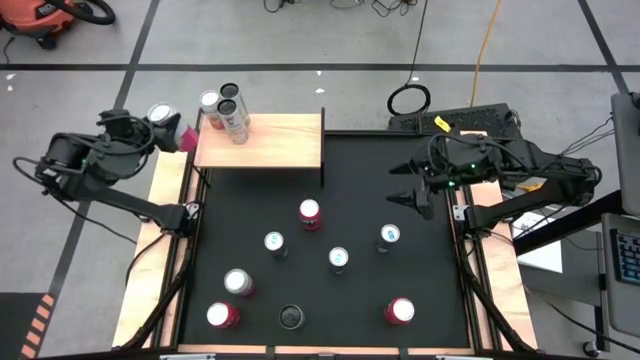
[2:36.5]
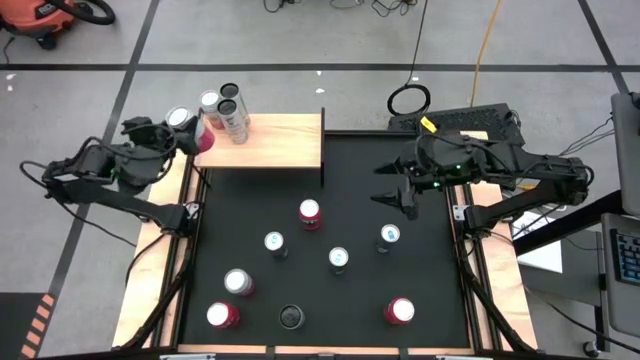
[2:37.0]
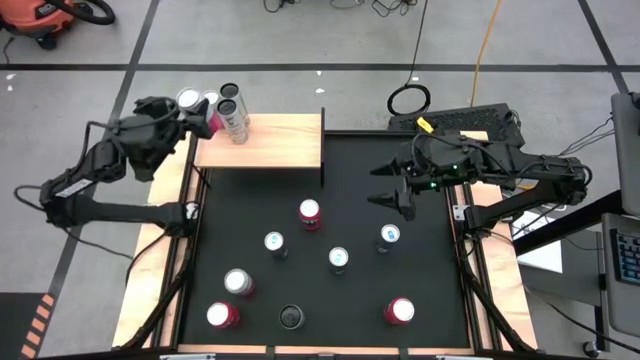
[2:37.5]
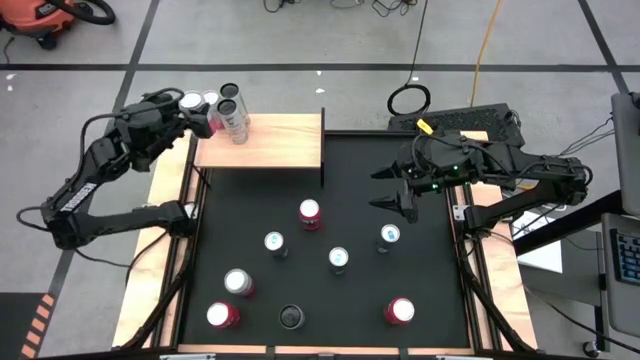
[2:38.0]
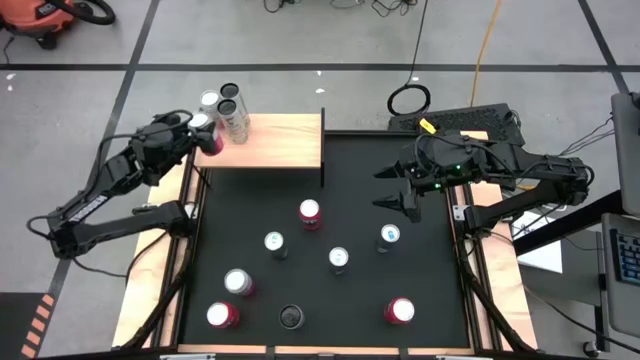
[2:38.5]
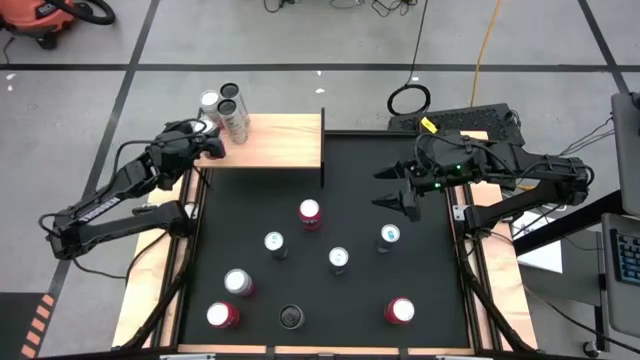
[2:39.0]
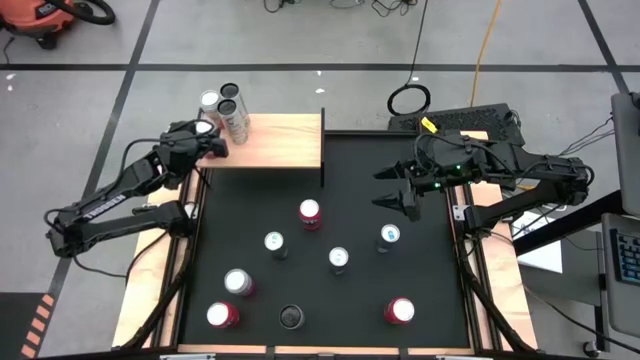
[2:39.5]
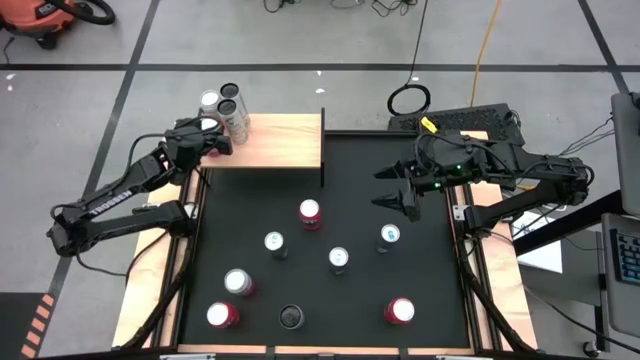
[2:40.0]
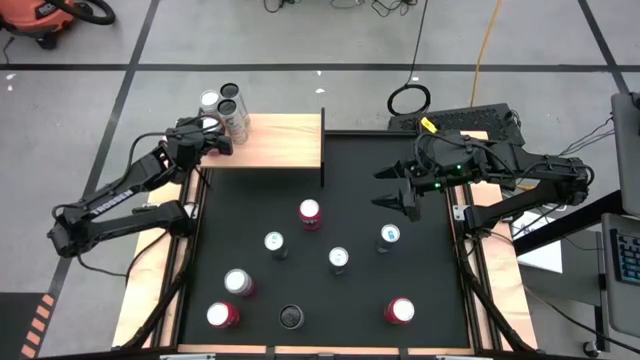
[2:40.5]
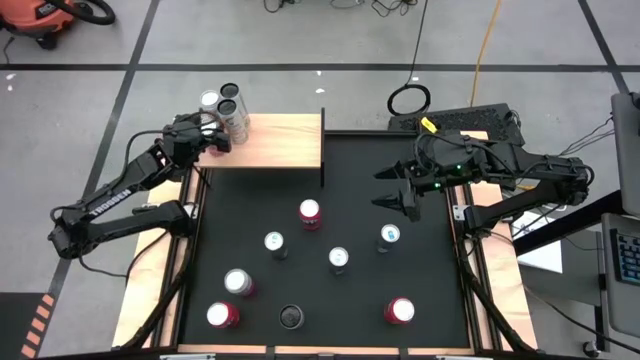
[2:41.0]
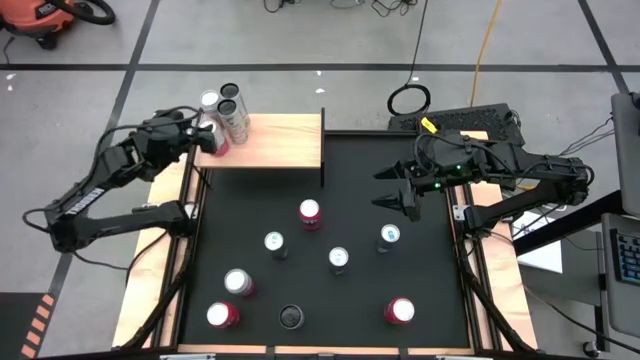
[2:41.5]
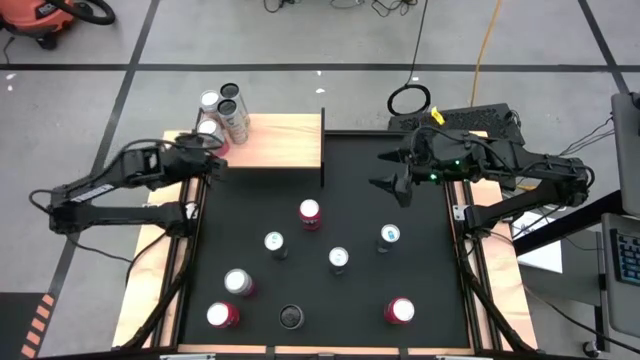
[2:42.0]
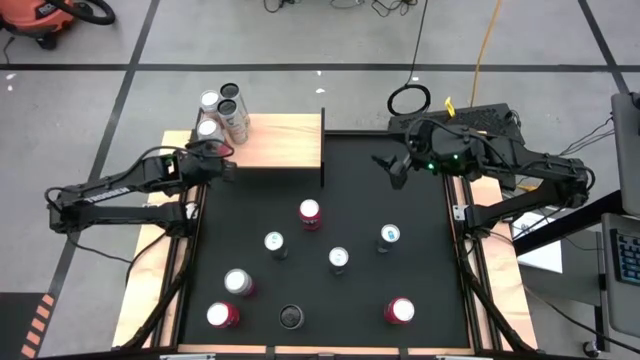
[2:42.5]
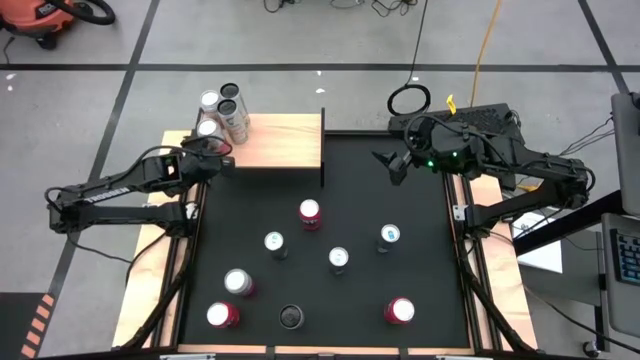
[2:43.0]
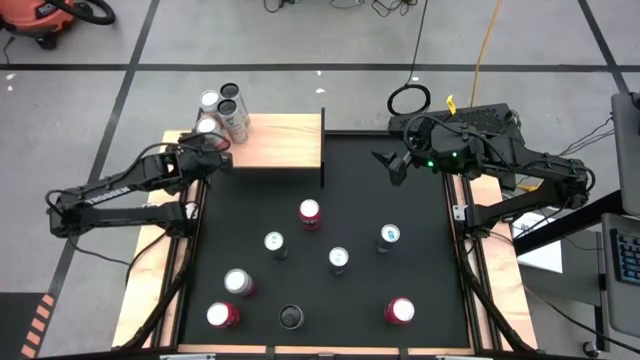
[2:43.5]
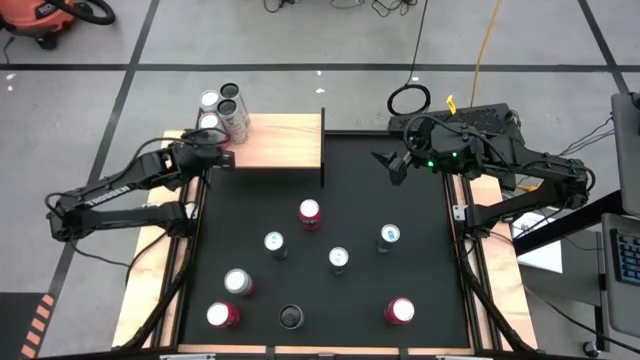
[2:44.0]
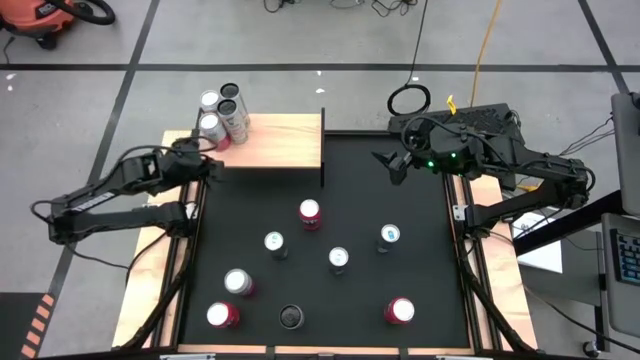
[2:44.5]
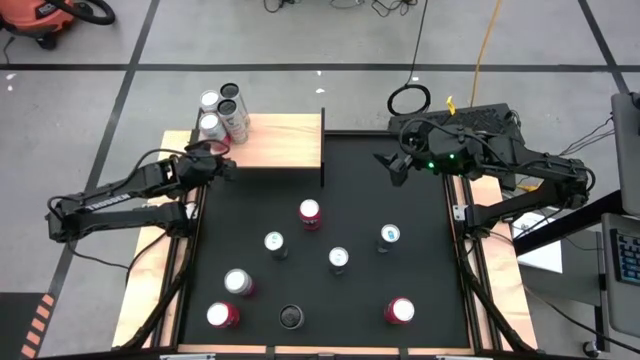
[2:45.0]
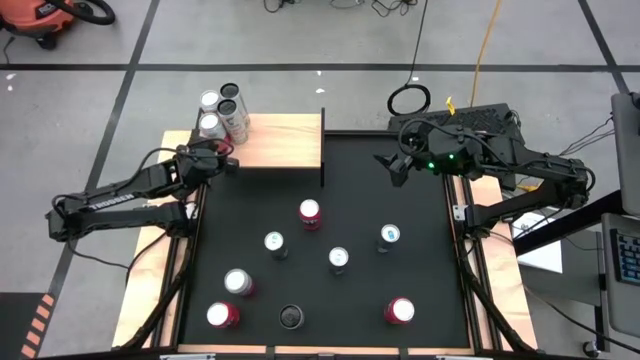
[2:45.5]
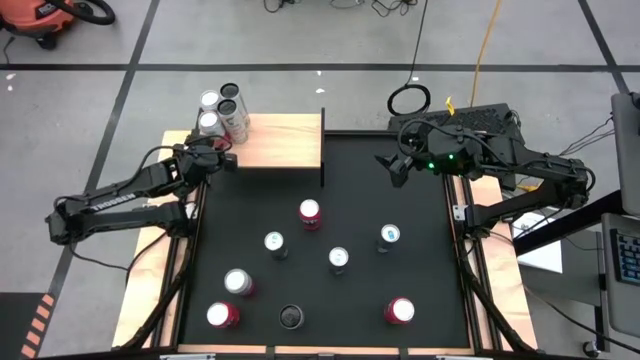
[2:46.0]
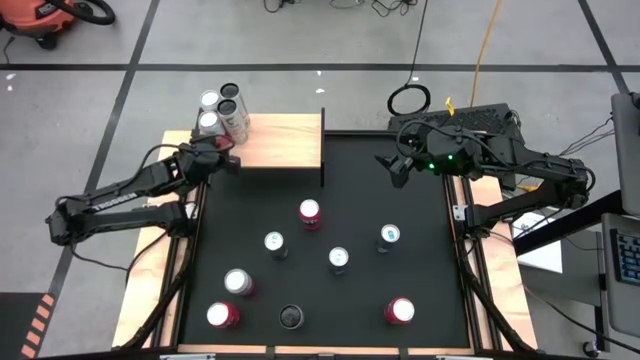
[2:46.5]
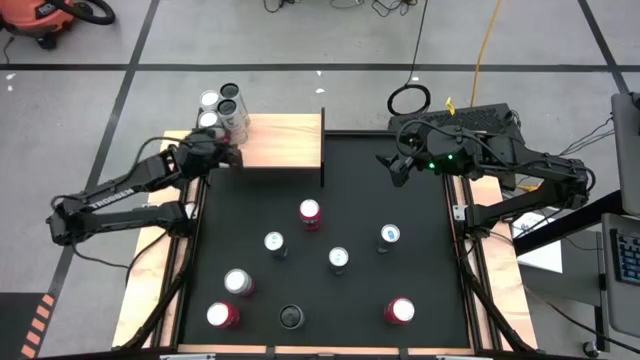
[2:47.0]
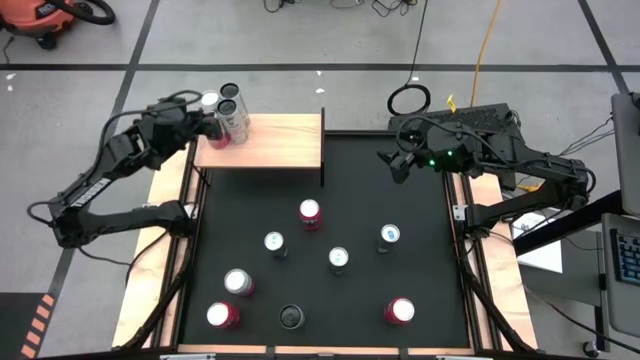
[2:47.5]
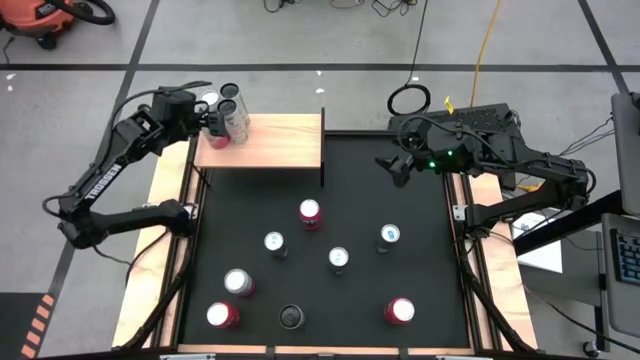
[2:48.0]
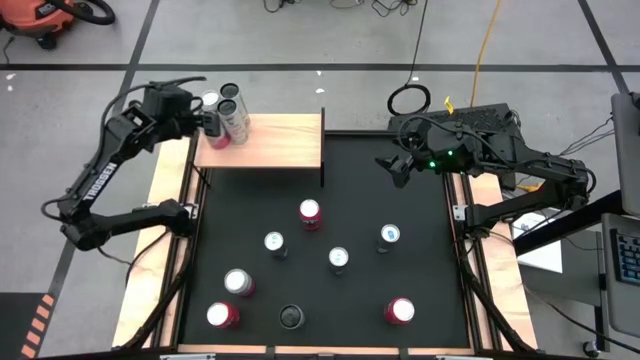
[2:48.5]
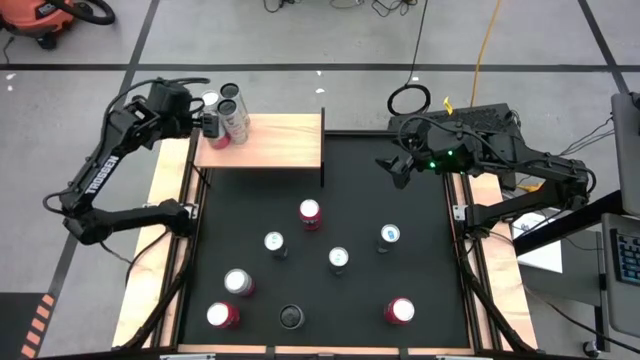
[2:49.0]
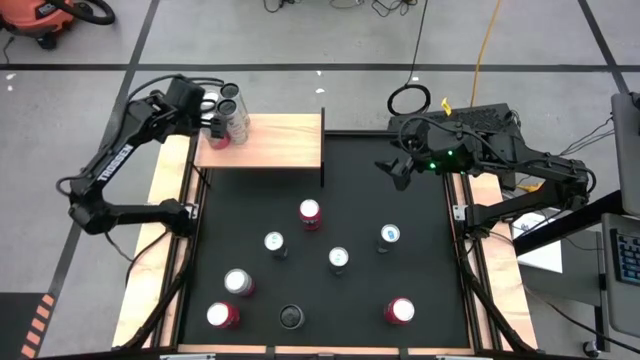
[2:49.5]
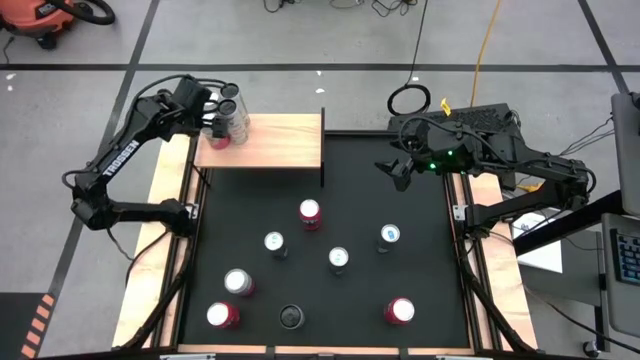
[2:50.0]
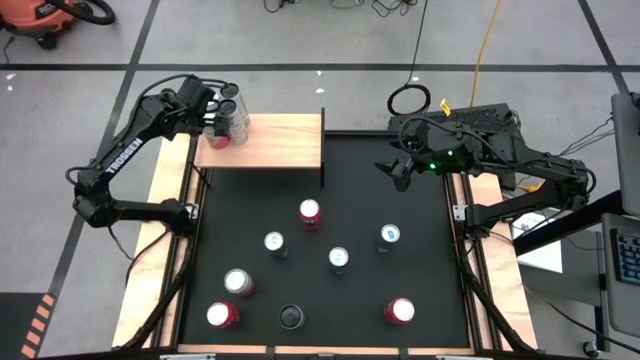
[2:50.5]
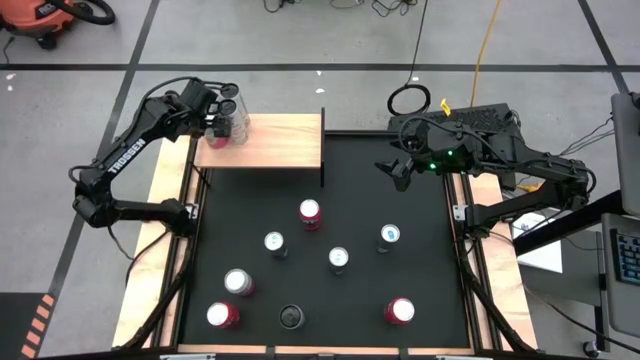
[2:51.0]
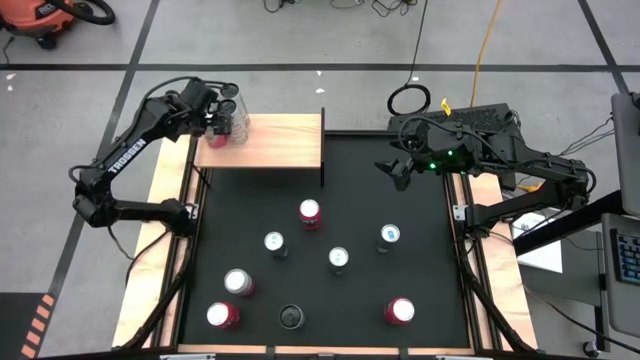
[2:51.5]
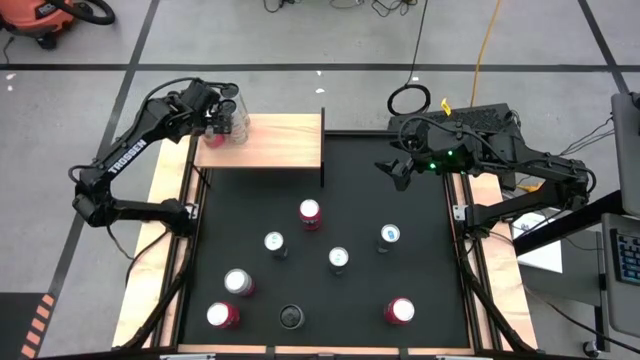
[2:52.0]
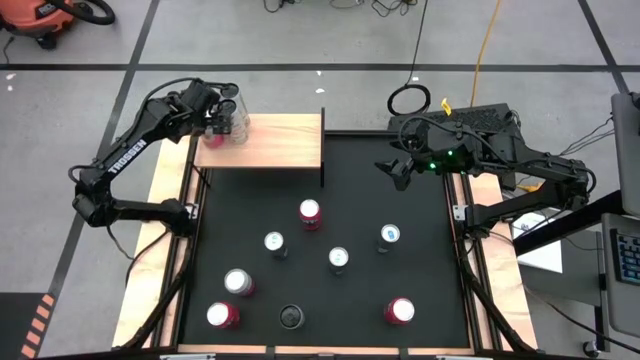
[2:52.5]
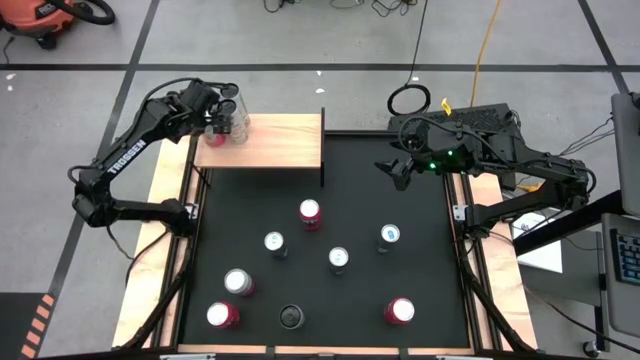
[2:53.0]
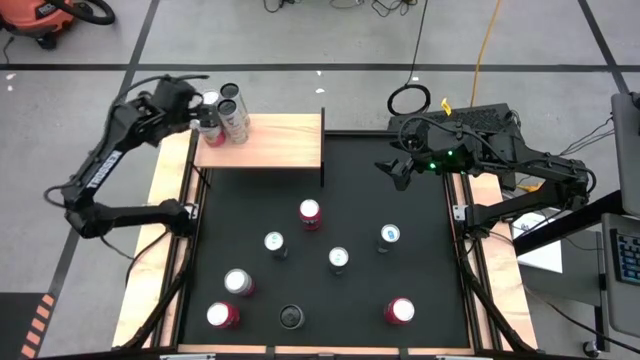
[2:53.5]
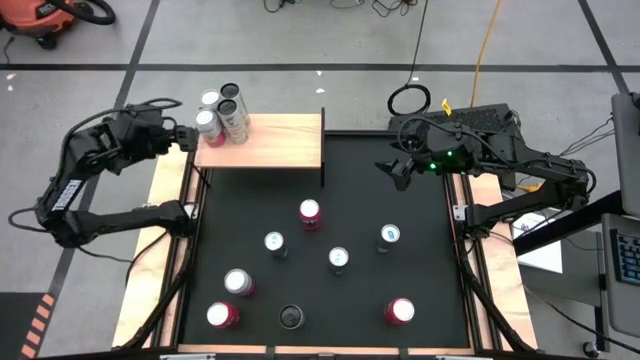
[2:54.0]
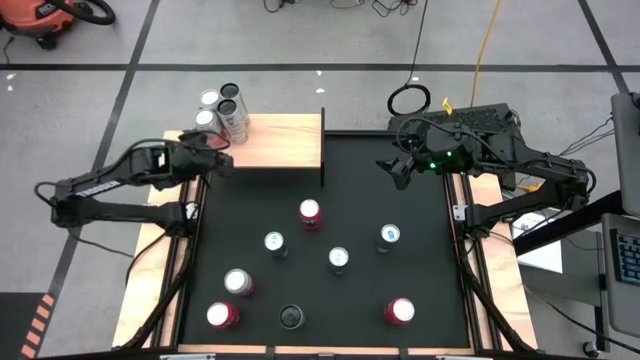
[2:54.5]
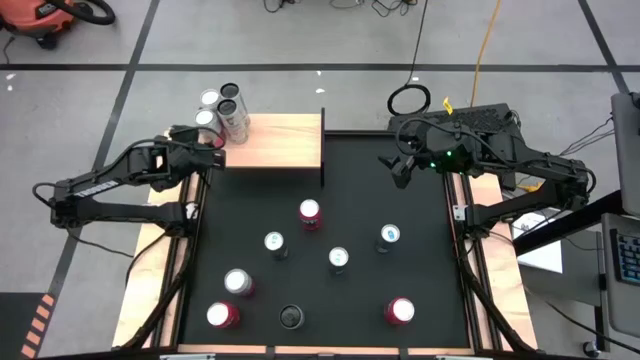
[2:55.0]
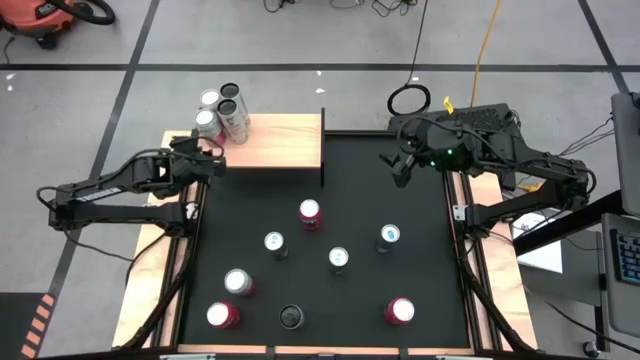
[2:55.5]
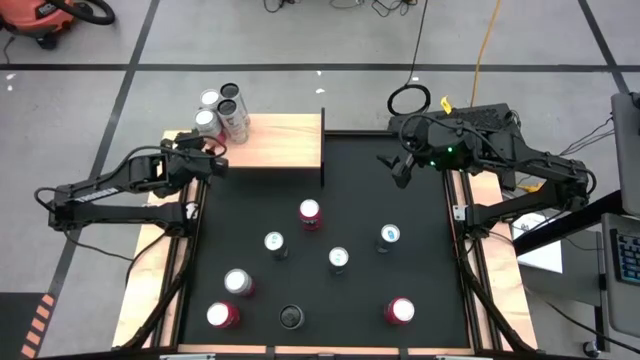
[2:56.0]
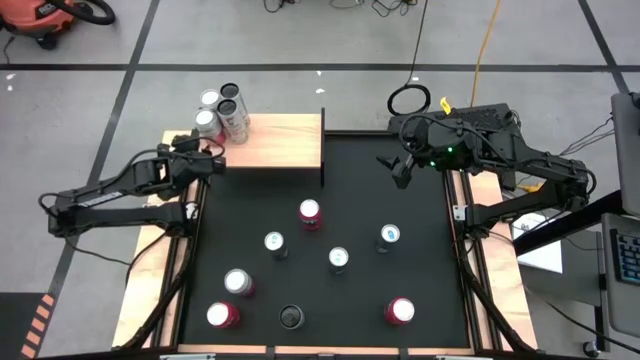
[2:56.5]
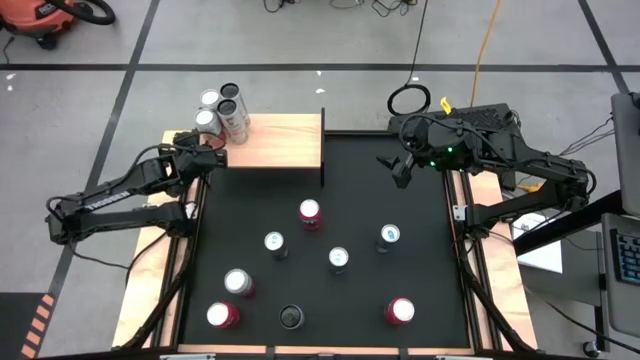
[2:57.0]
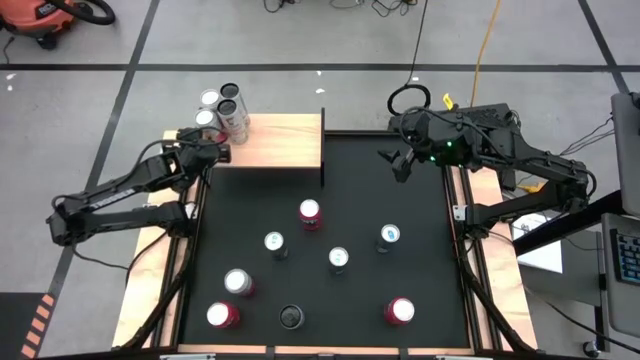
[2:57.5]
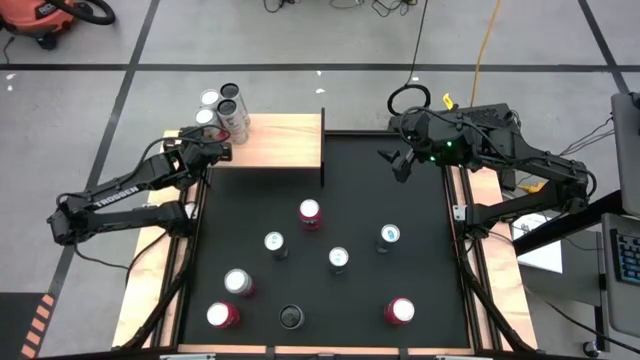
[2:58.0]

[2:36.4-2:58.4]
Task: Place canned beverage on shelf
Put the right pink soda can on the shelf aligned with the other pink soda can
